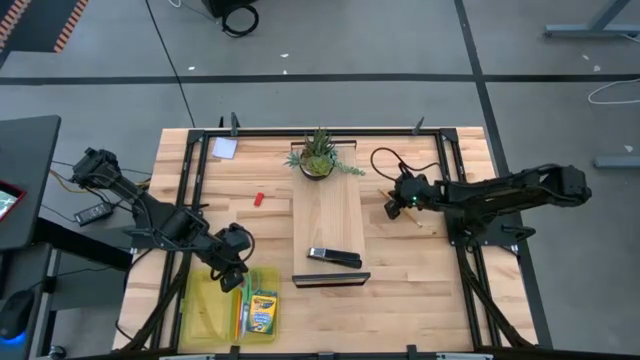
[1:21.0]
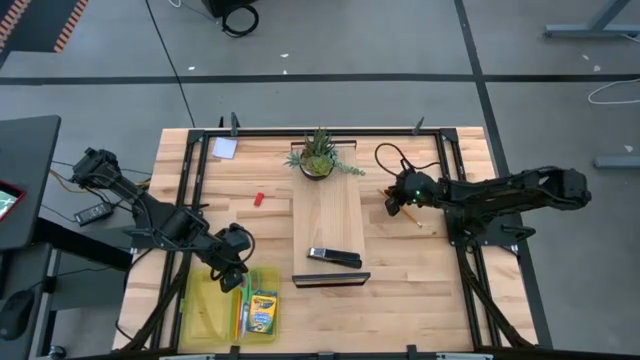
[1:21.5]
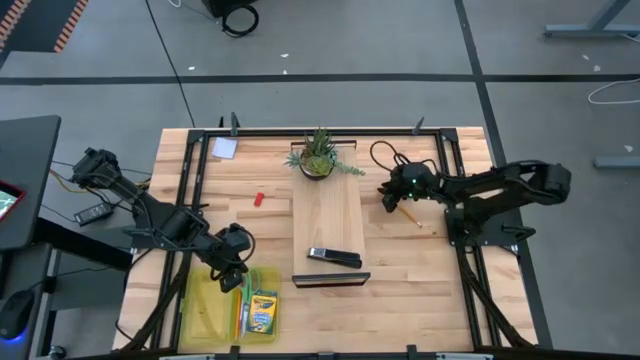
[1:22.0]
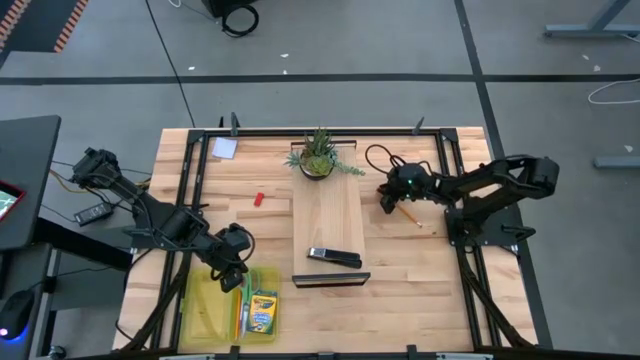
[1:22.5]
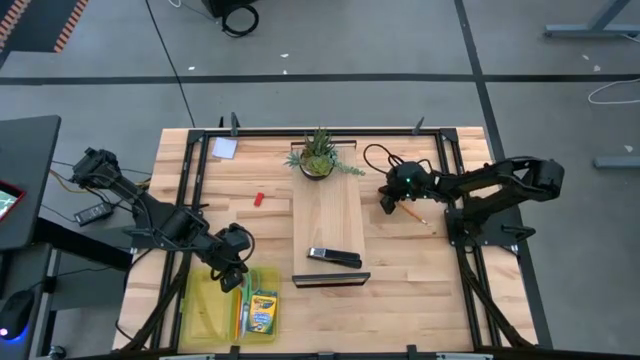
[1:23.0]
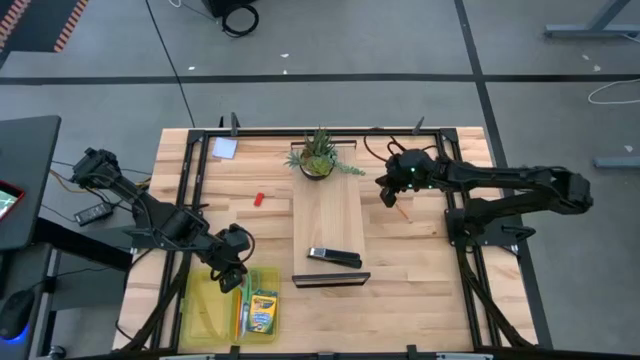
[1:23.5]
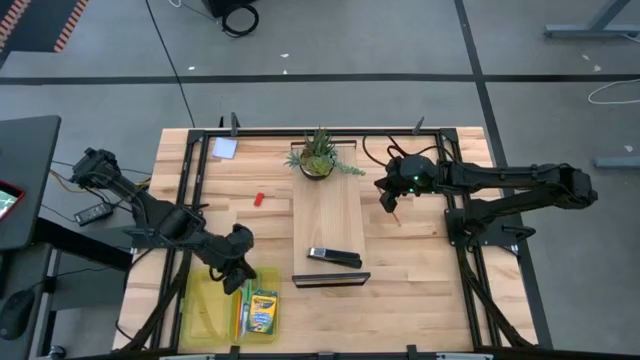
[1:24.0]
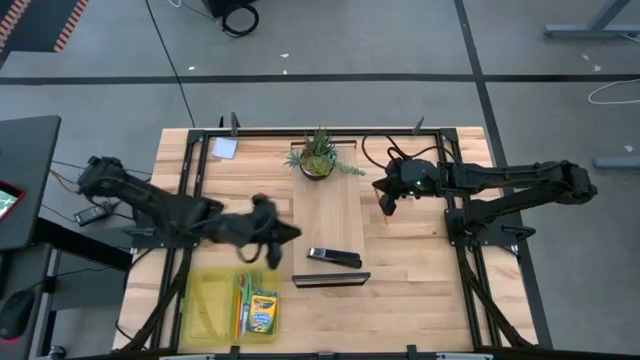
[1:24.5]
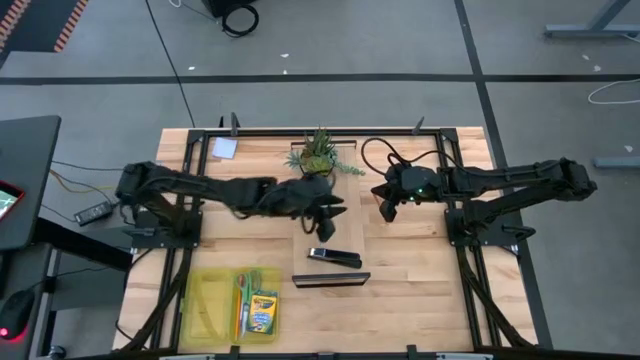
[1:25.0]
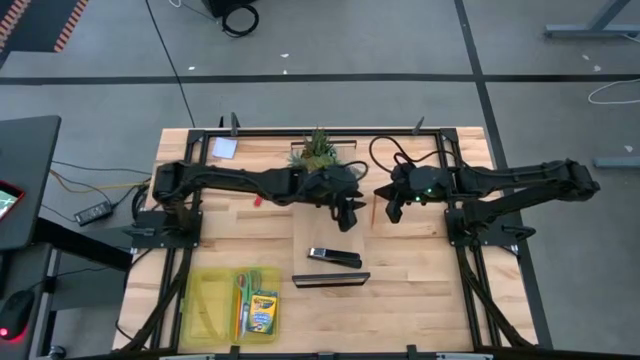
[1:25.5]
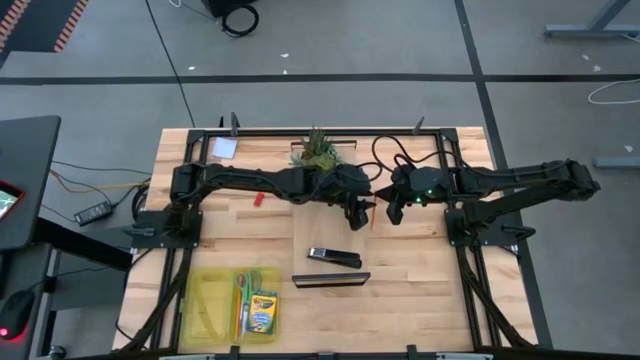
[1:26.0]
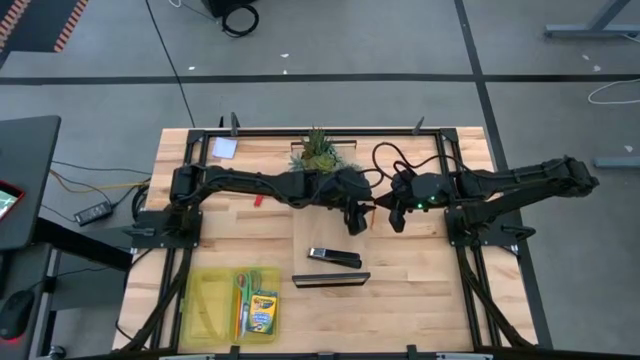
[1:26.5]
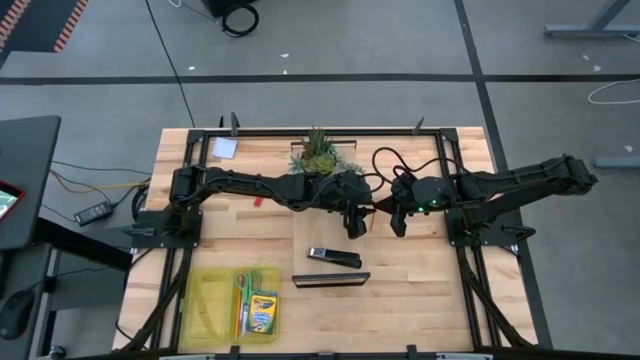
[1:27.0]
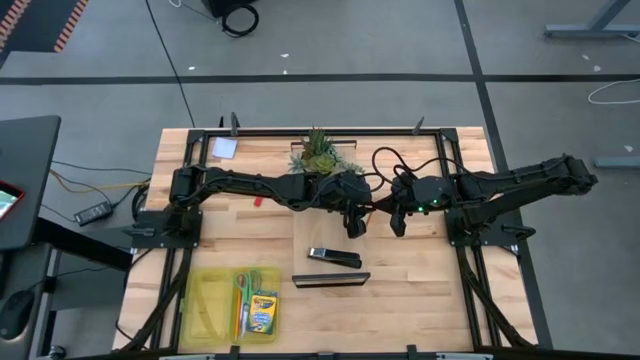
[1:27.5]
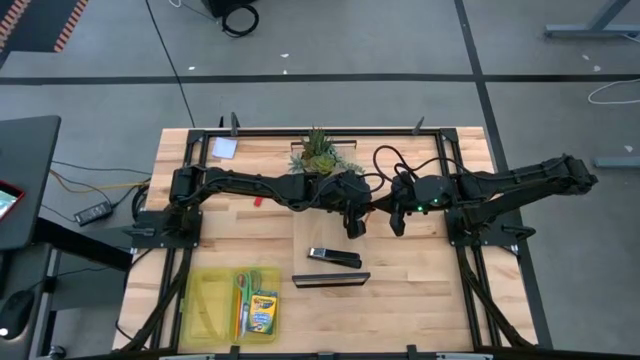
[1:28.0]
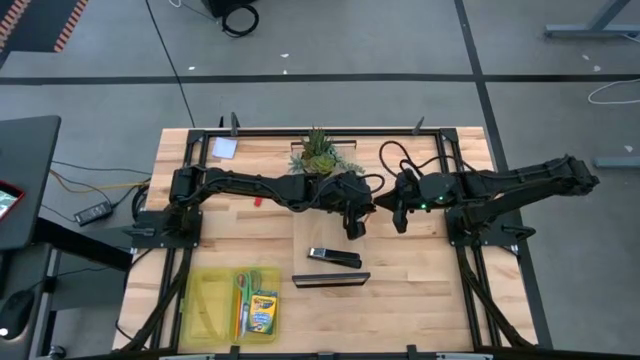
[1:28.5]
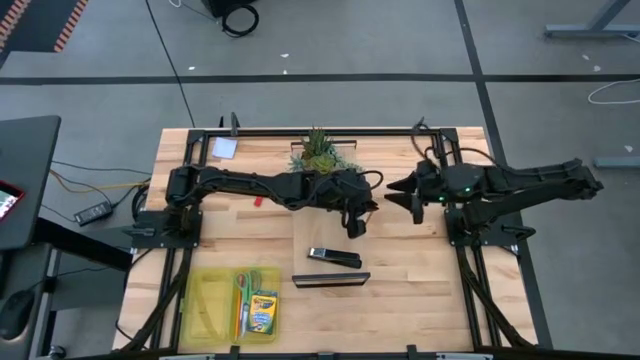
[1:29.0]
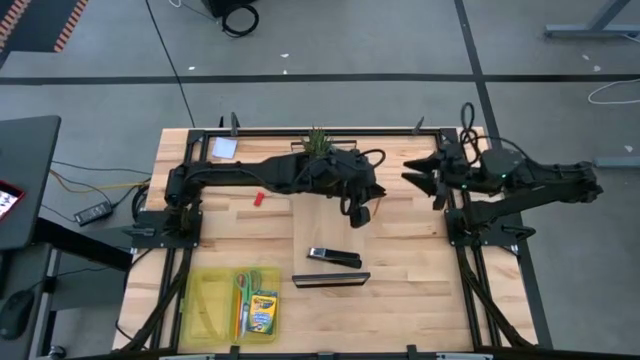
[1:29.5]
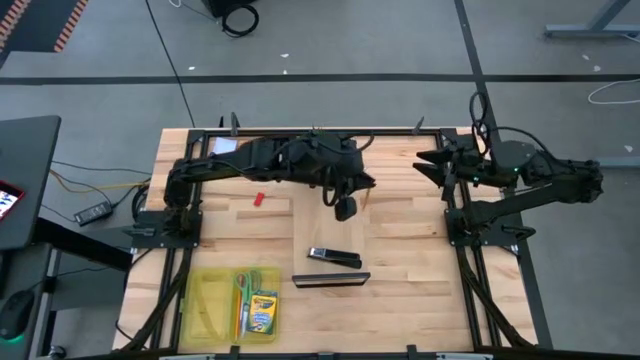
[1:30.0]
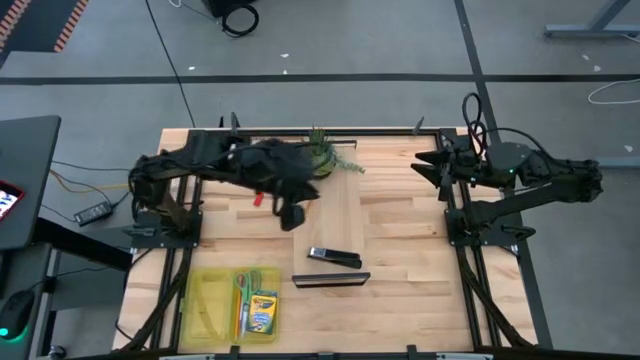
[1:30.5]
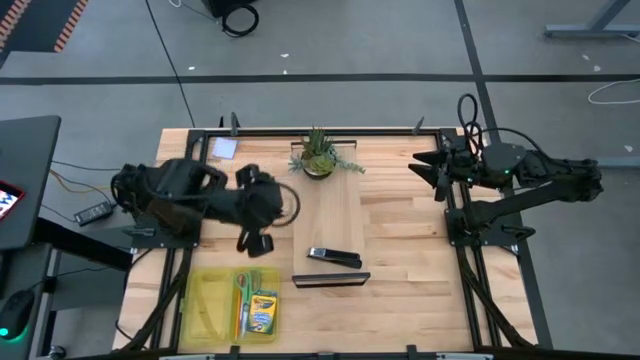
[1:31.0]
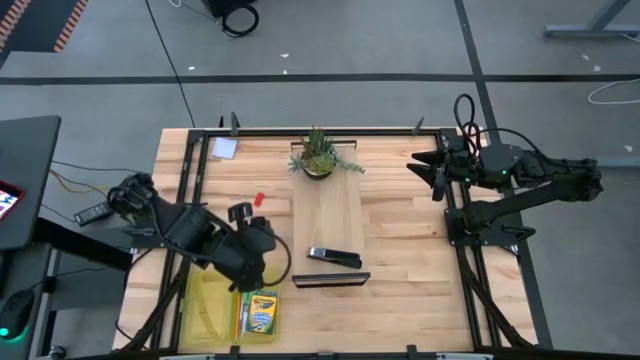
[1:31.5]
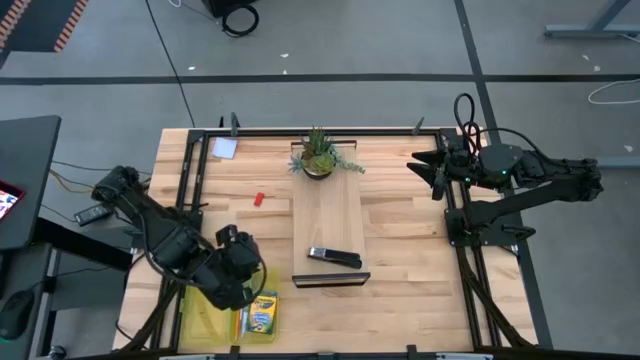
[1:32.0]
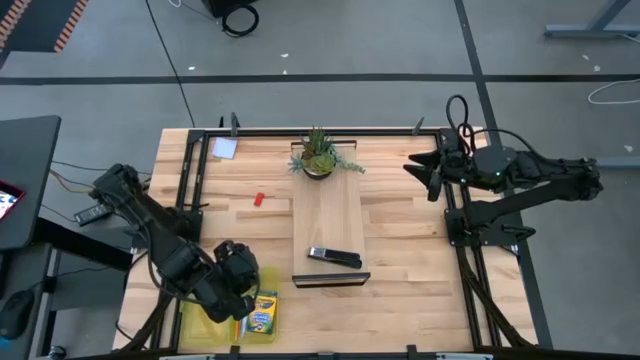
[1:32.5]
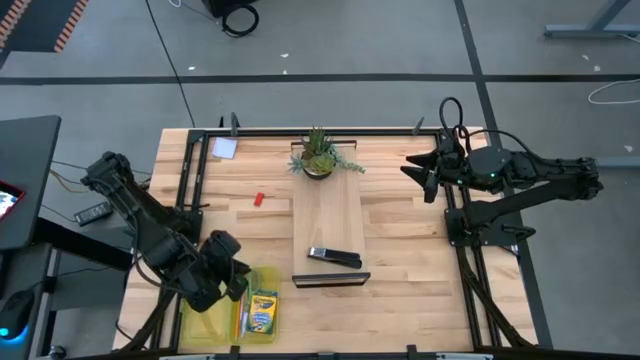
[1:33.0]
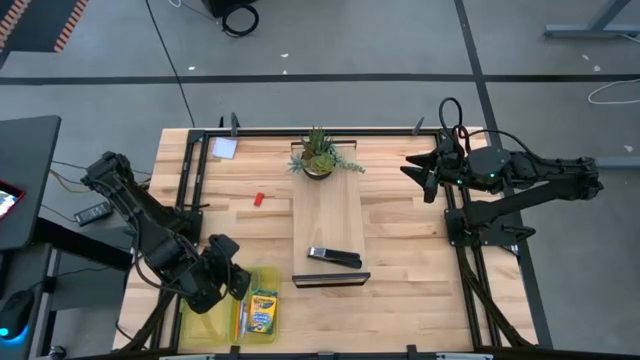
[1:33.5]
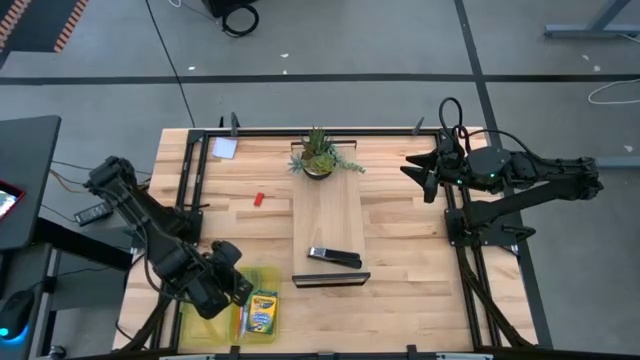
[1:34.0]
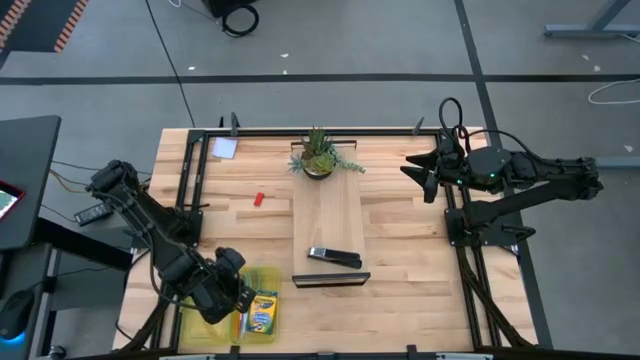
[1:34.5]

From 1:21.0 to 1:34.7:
Task: Pack school essentials
Put the orange pencil into the yellow supply box

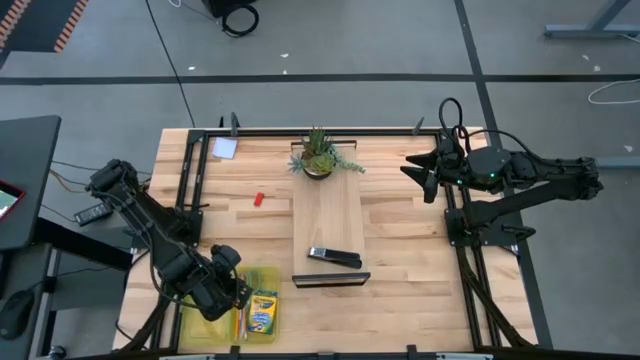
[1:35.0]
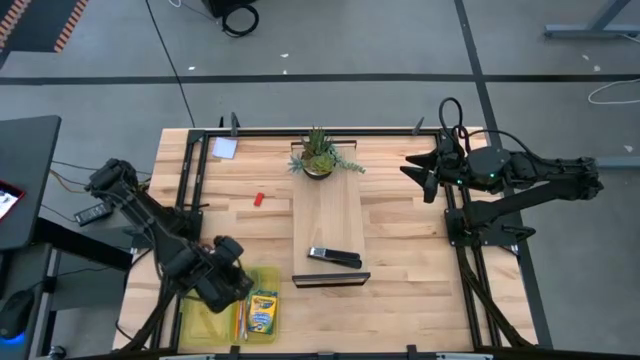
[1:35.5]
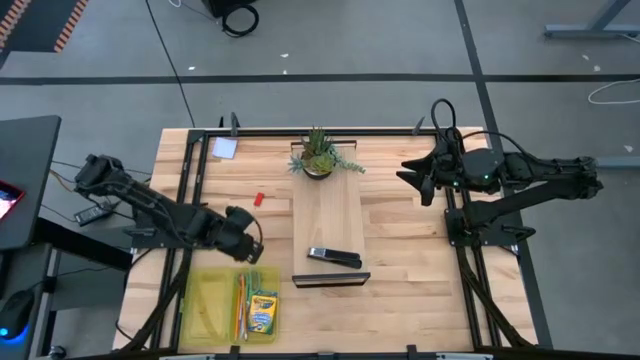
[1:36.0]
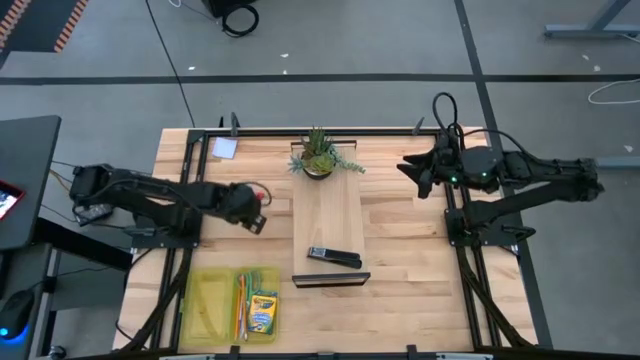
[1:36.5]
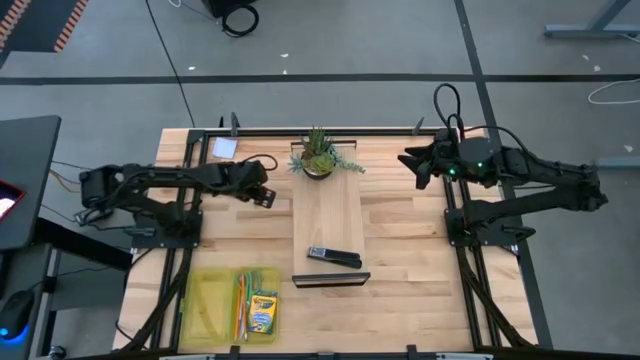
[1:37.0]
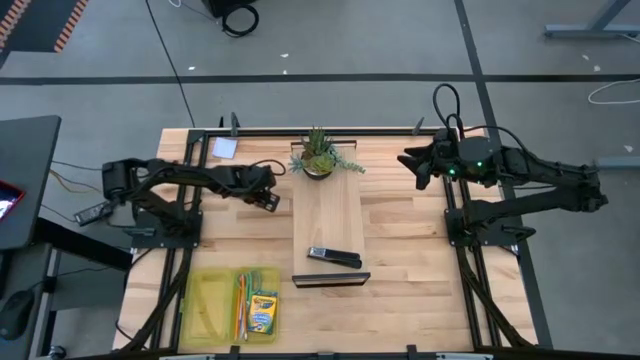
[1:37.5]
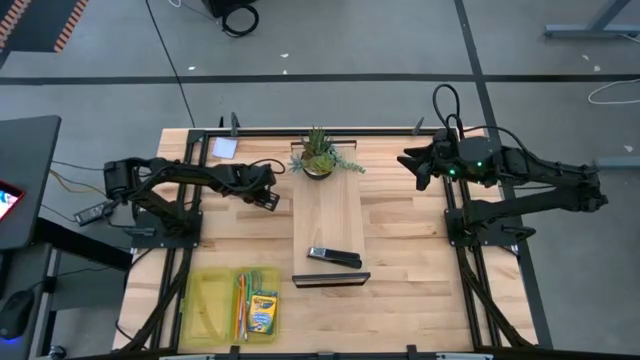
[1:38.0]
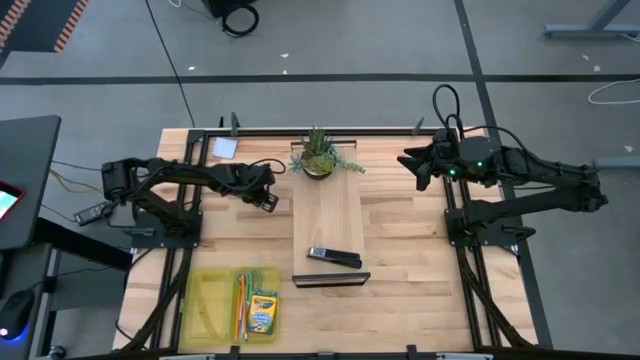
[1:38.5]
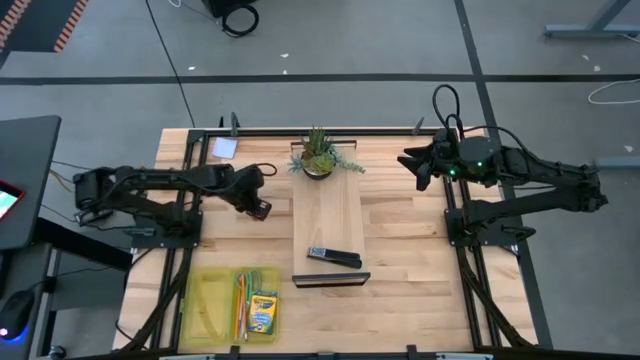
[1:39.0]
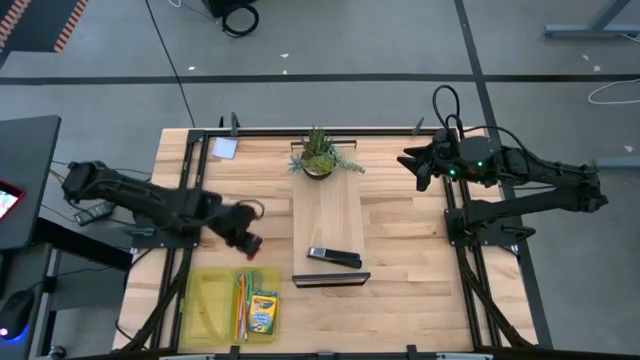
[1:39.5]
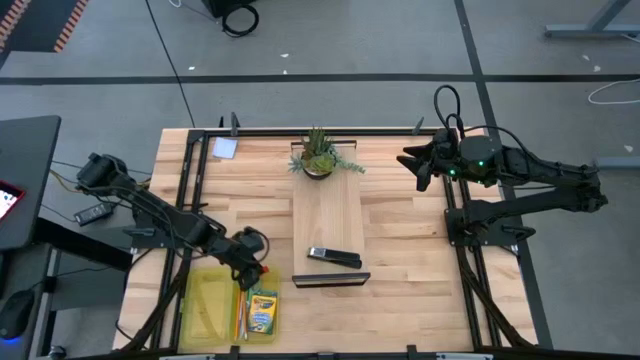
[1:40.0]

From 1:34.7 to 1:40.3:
Put the red eraser into the yellow supply box
